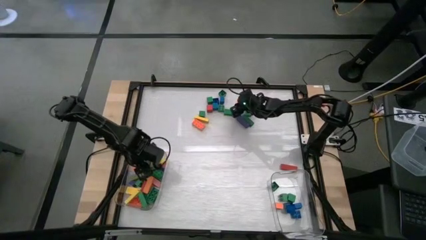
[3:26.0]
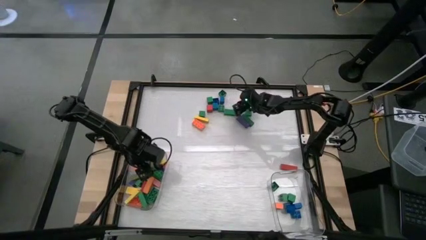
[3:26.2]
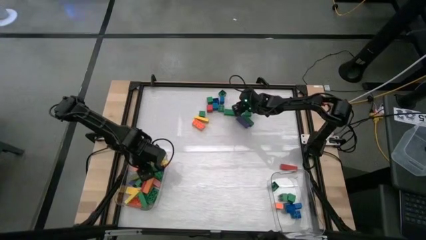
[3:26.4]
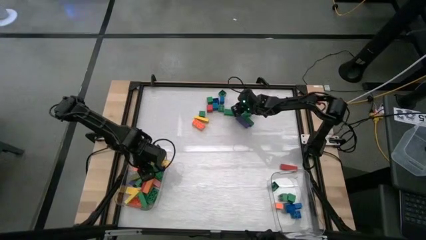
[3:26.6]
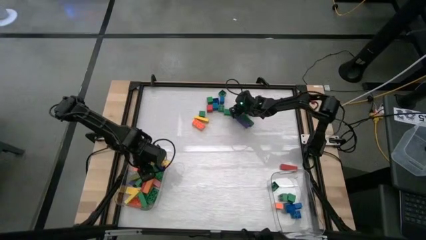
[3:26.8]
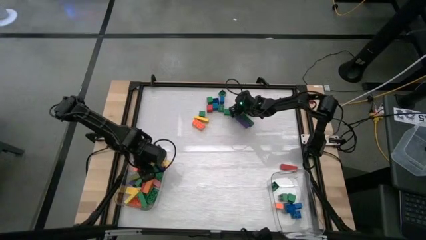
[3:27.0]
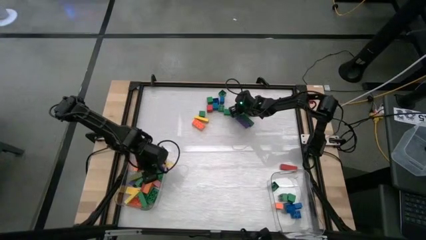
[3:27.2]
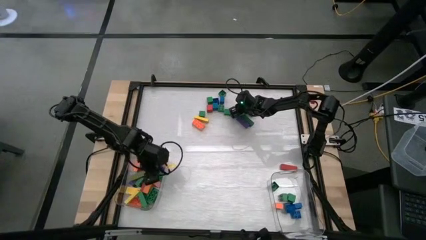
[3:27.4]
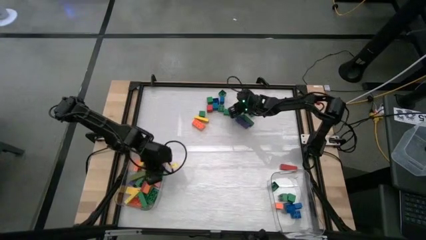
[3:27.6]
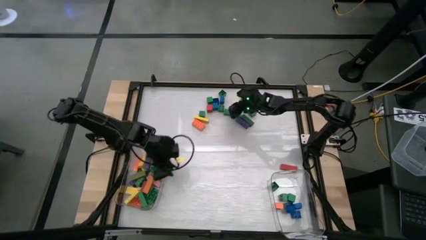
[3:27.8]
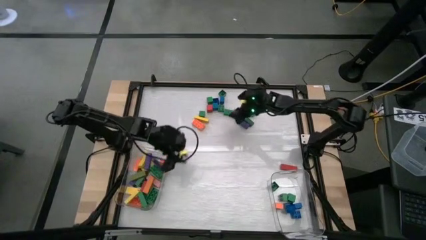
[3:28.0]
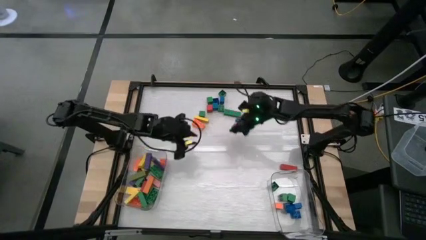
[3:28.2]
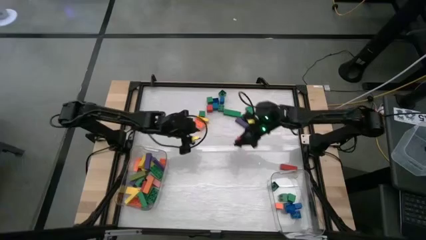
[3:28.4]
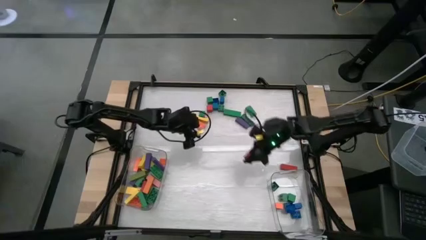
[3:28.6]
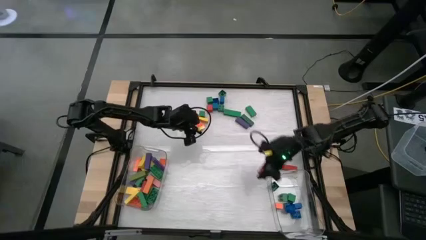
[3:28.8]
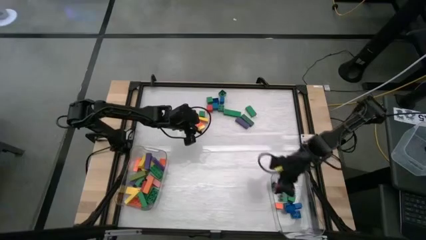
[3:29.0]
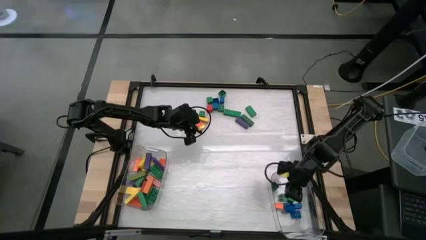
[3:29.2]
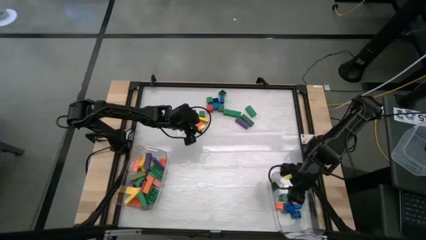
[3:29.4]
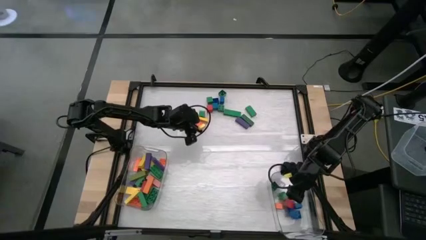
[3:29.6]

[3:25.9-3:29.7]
Task: Sort blocks by size
Put the small red wooden block into the right transparent bin

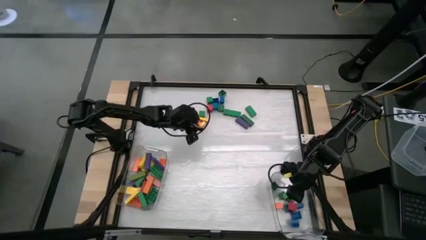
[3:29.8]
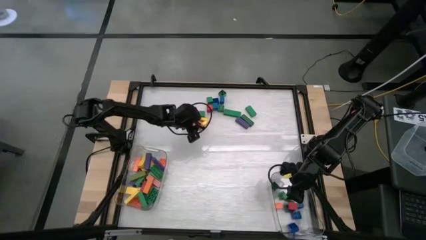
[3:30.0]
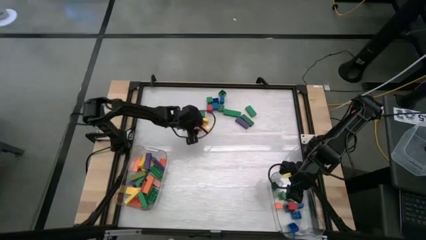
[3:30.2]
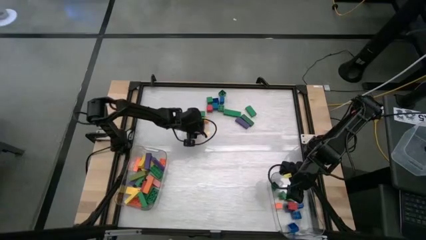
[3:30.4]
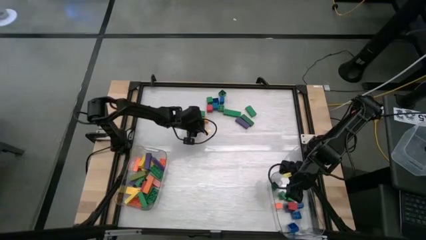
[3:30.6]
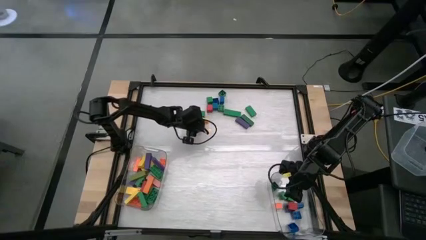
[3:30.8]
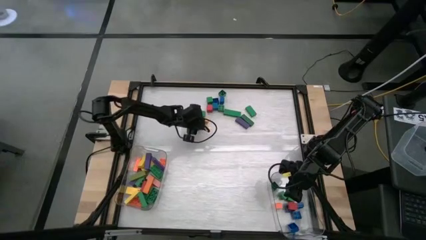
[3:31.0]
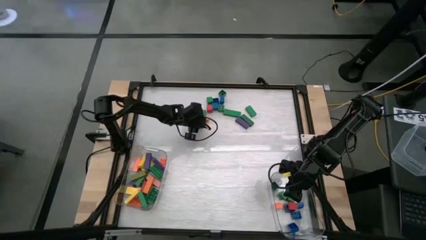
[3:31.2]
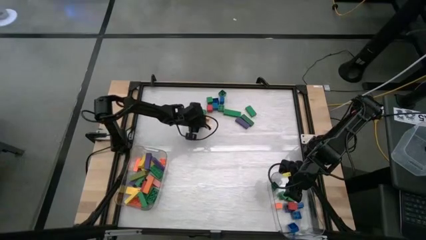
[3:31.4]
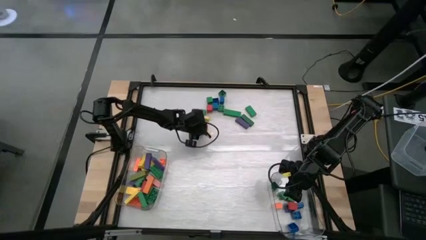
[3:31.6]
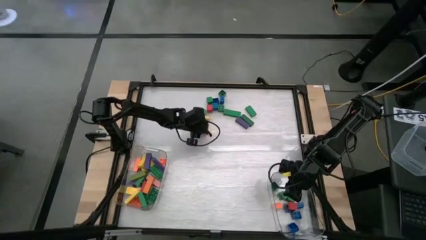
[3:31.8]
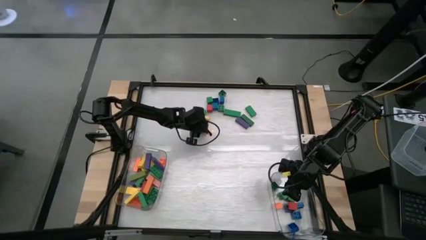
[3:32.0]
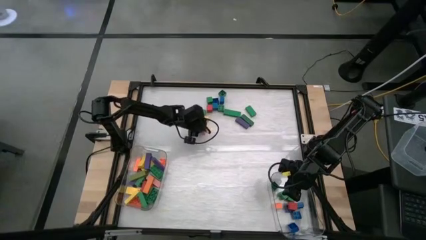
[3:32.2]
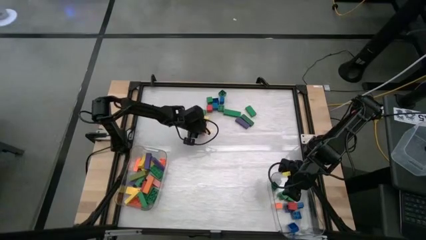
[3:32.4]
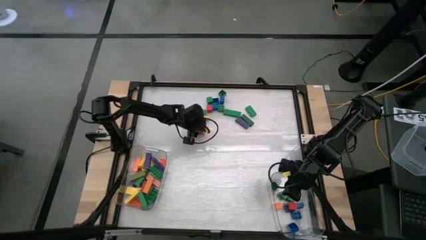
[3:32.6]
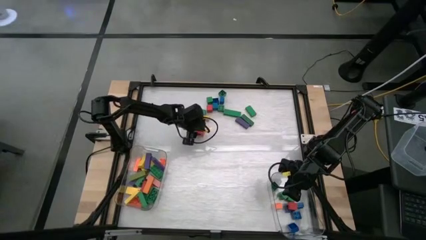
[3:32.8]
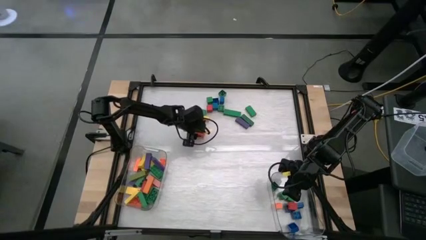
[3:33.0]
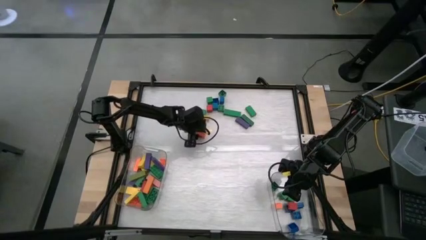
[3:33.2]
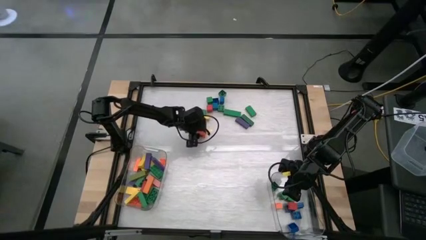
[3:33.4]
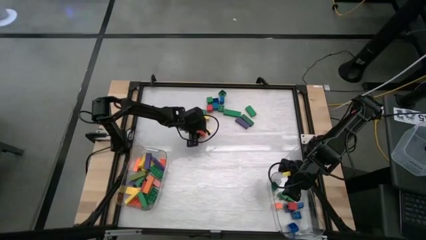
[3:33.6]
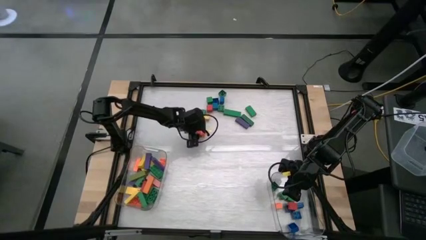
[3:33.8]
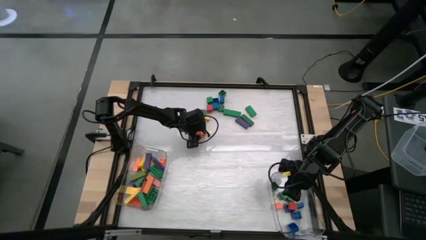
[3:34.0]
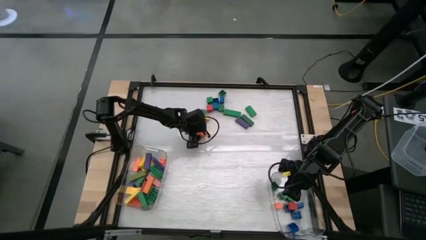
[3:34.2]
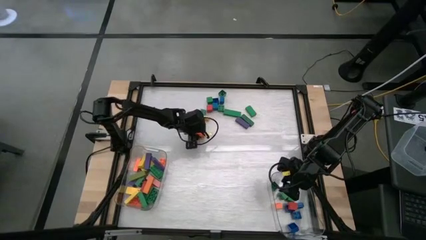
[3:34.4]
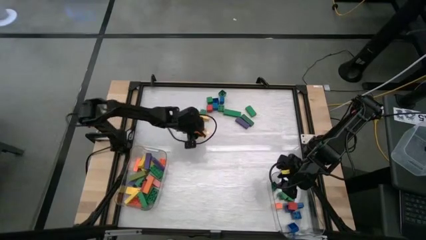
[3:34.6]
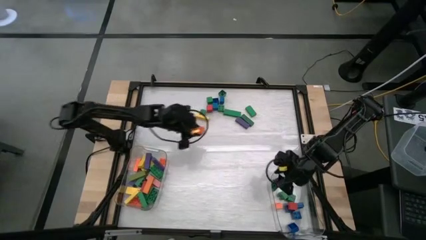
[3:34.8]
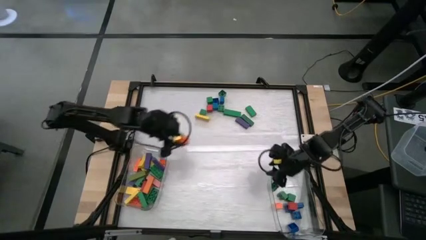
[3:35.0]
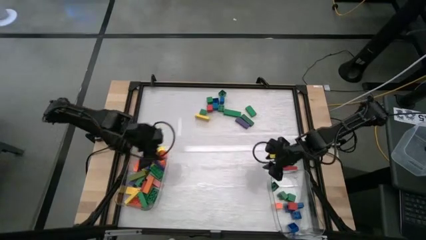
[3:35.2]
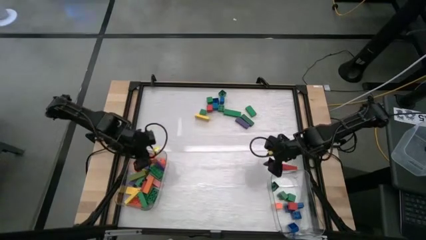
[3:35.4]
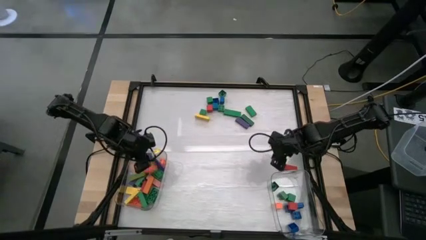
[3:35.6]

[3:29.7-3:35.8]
Put the large orange game piece into the left transparent bin

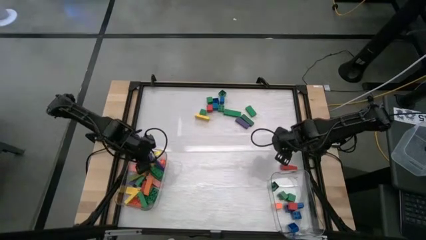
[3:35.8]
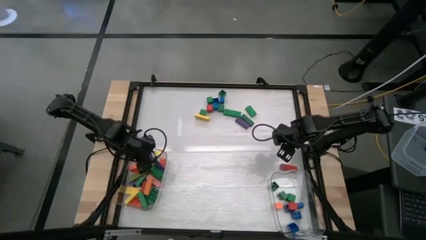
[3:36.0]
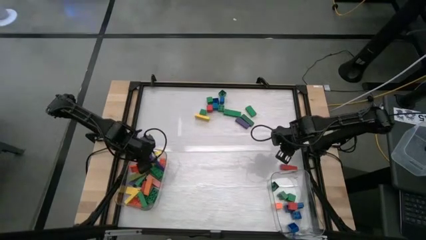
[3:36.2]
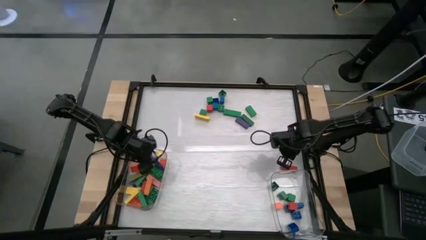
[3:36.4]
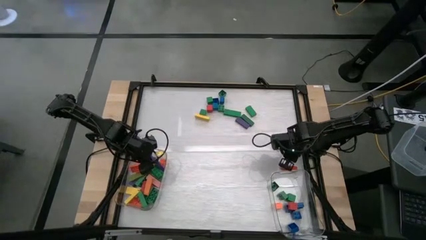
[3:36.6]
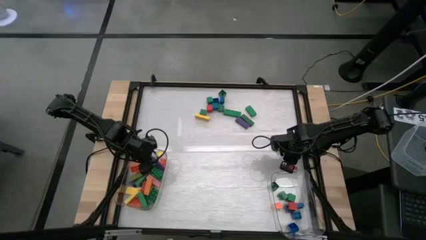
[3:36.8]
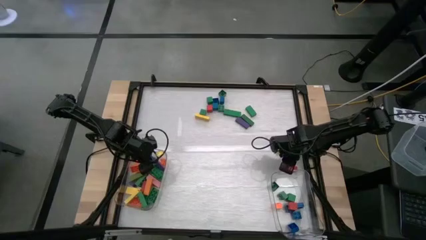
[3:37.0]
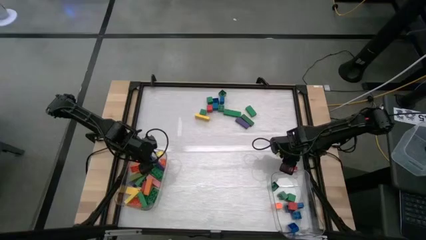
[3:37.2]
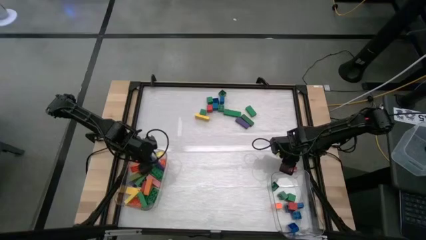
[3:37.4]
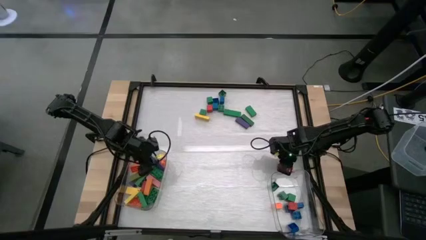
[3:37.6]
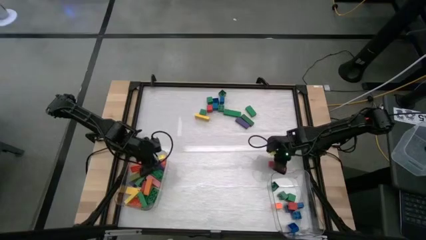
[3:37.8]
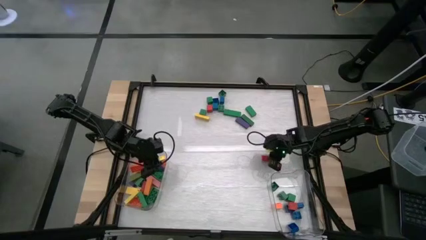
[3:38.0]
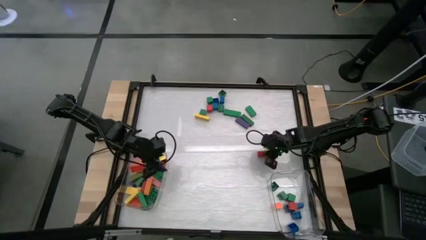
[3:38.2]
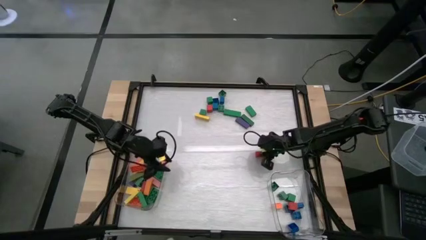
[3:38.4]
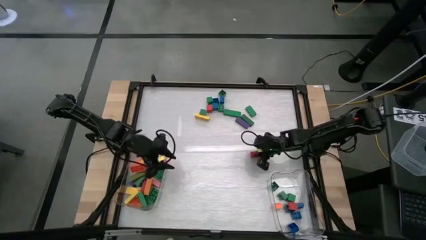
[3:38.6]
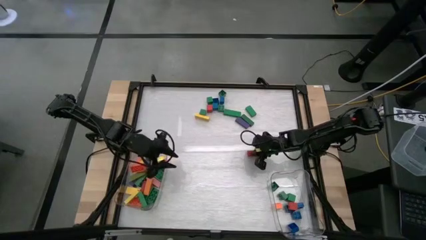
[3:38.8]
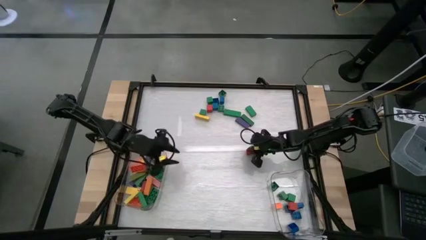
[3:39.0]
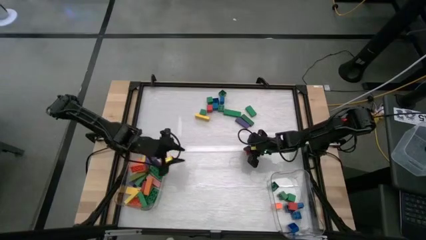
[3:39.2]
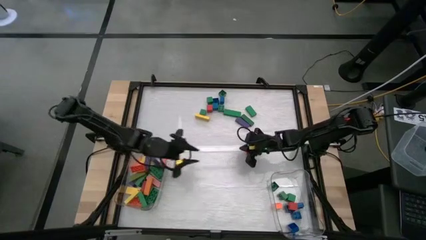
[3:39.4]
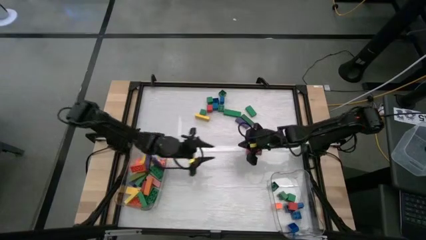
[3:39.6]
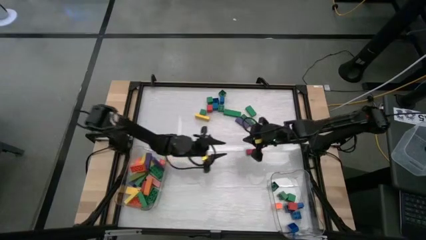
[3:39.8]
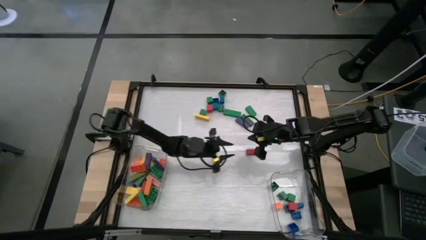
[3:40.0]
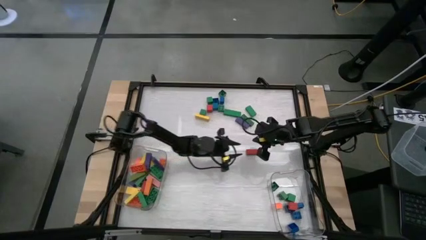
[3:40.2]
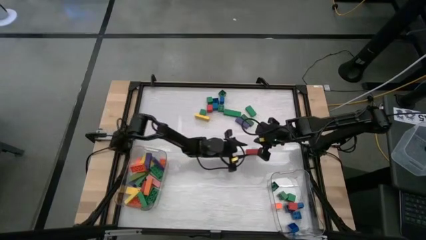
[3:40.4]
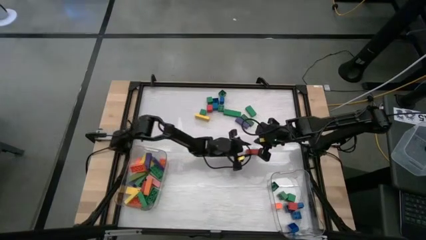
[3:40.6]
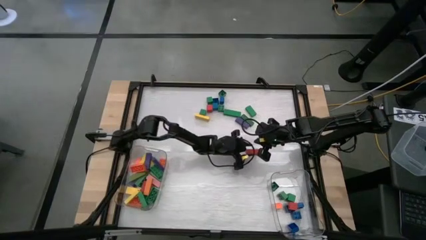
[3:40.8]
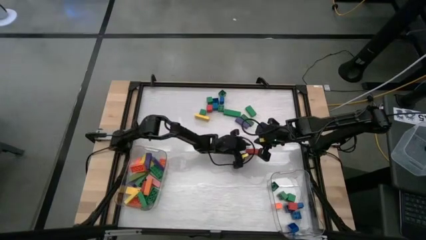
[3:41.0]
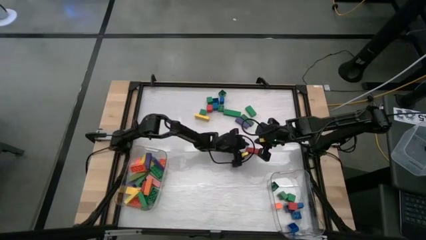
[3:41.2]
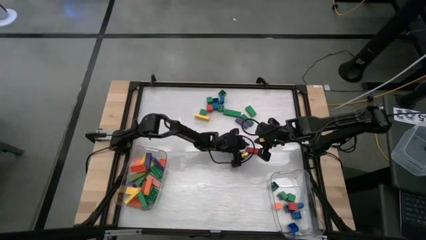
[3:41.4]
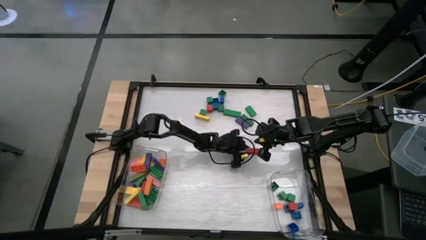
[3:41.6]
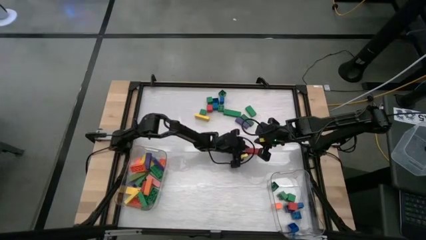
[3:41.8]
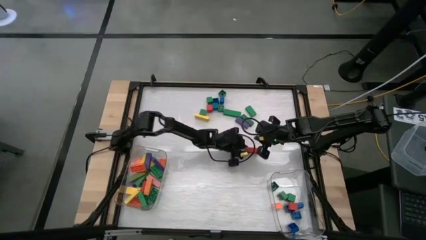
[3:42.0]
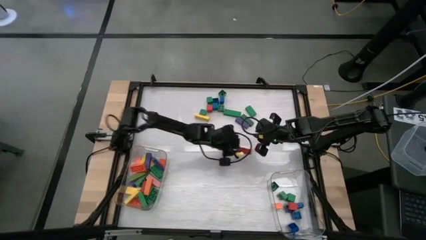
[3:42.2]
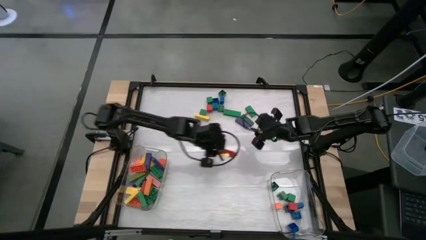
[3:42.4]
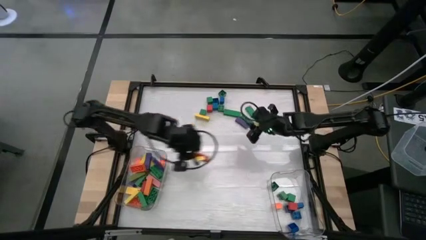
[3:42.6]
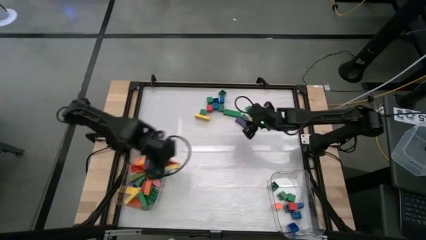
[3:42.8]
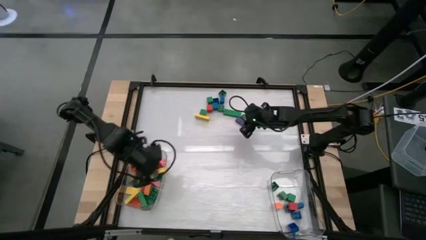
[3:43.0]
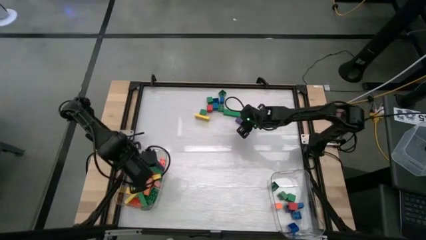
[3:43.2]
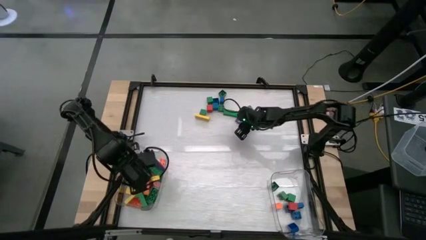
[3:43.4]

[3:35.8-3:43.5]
Put the large red wooden block into the left transparent bin
